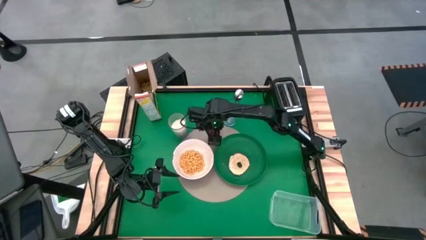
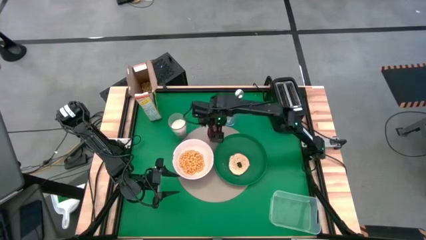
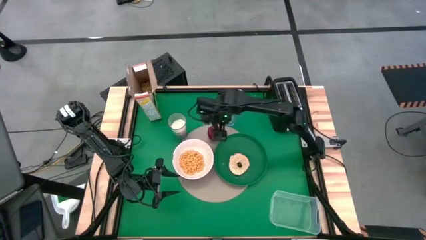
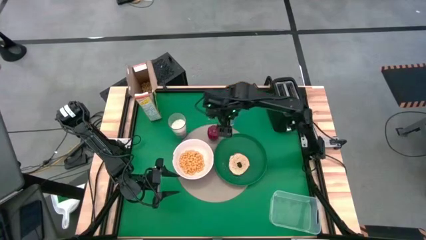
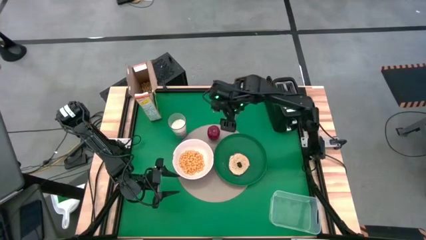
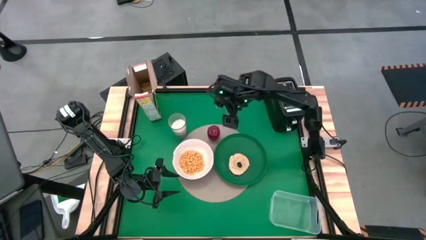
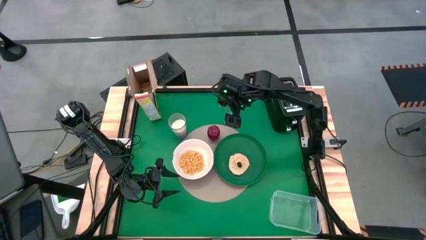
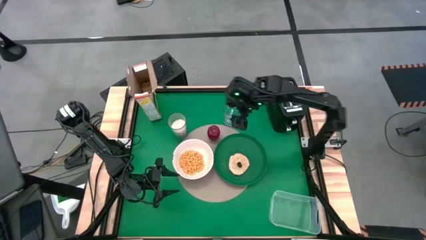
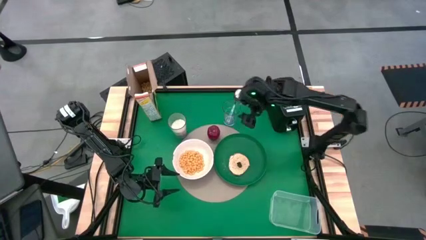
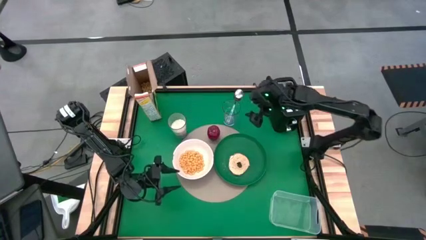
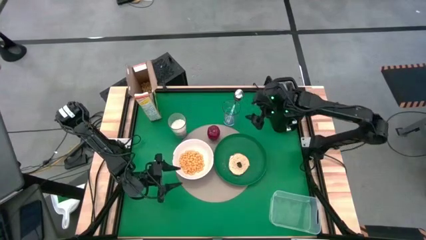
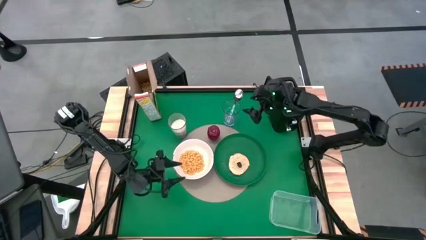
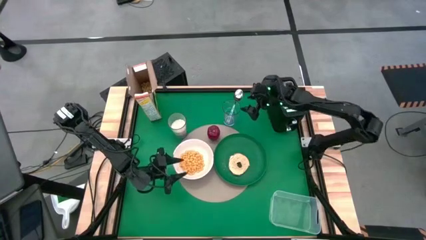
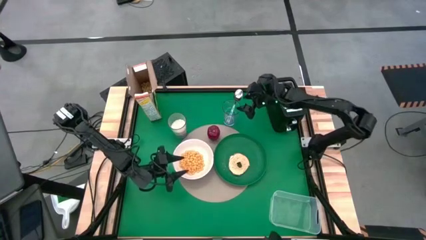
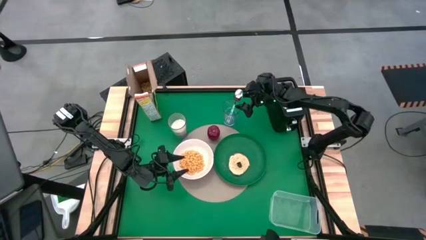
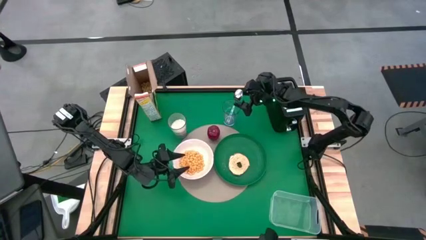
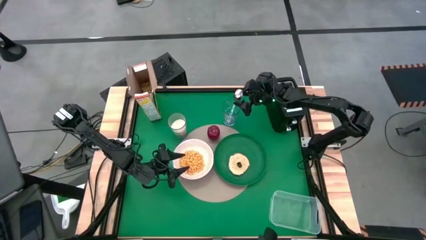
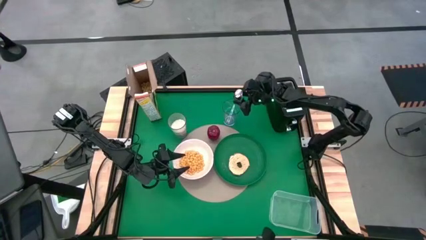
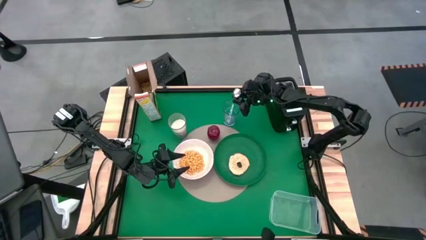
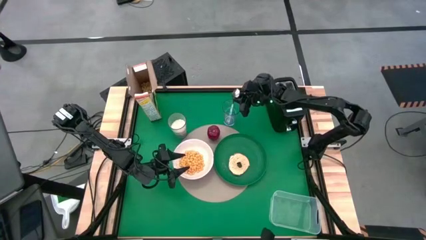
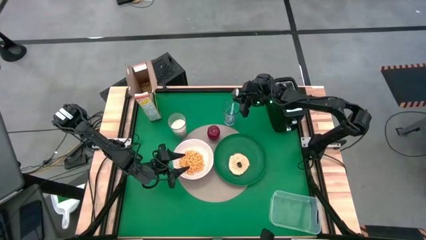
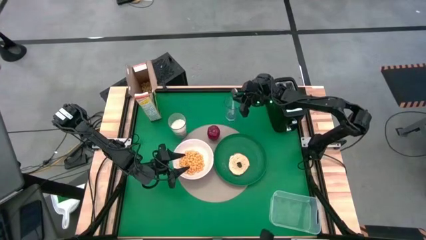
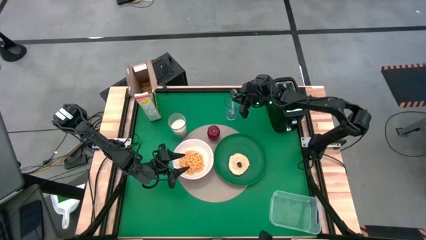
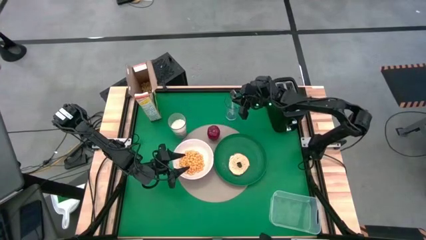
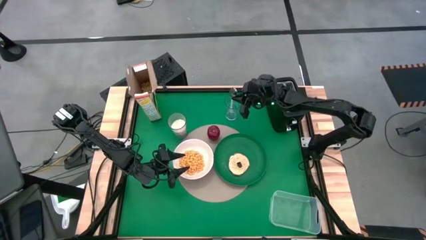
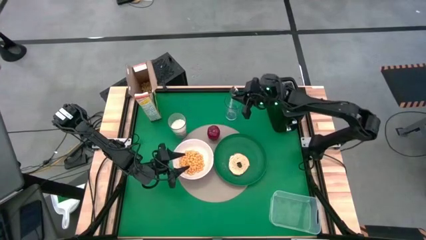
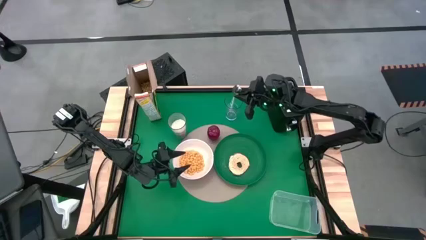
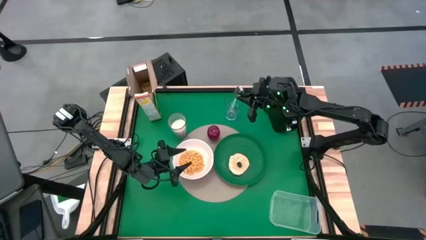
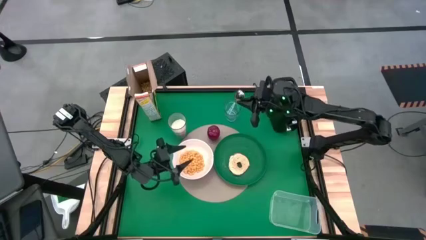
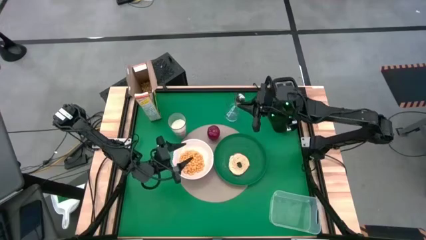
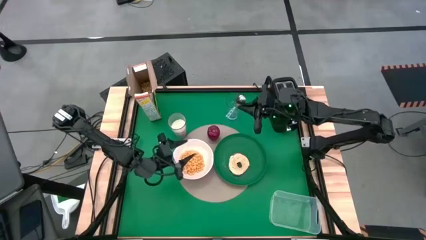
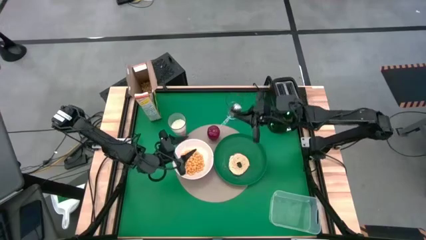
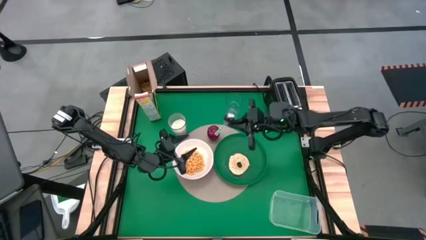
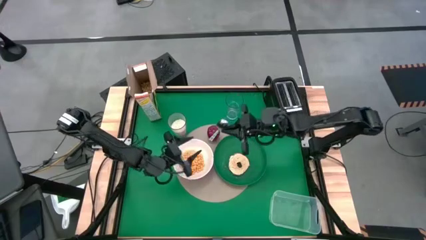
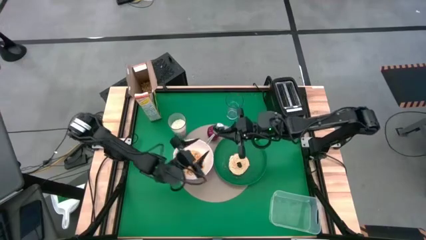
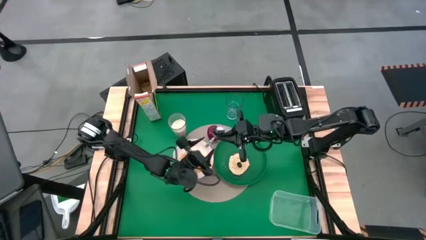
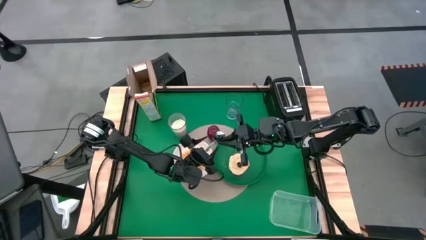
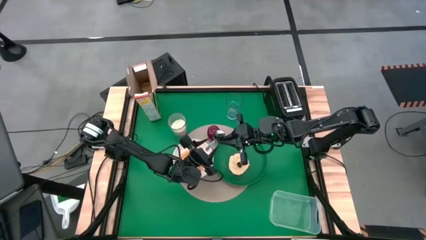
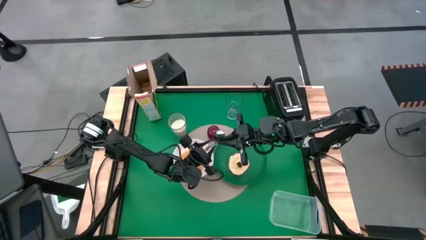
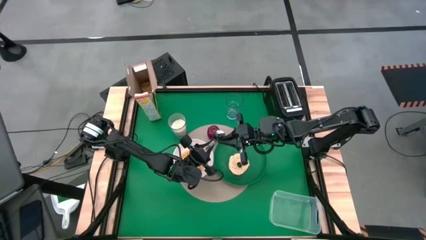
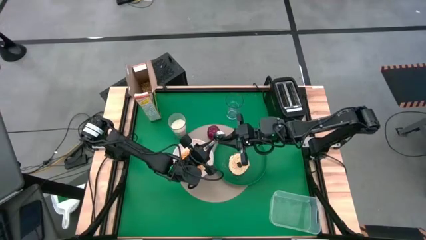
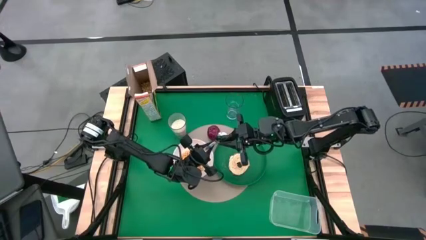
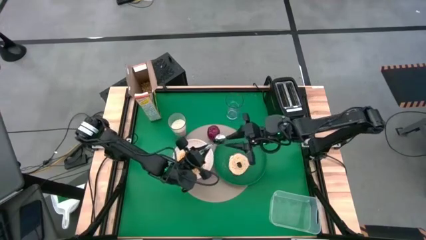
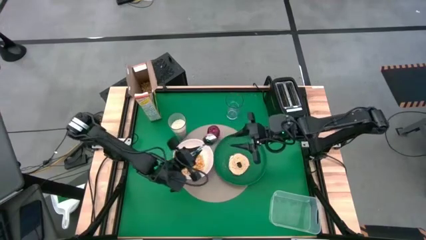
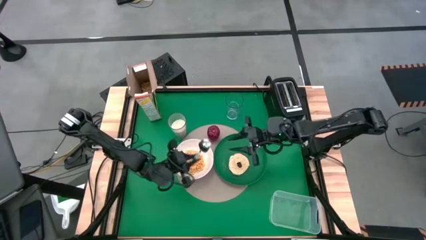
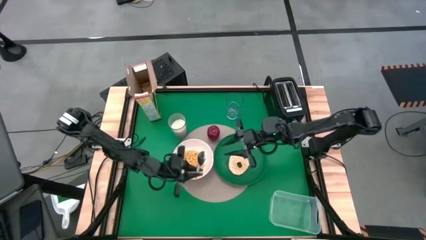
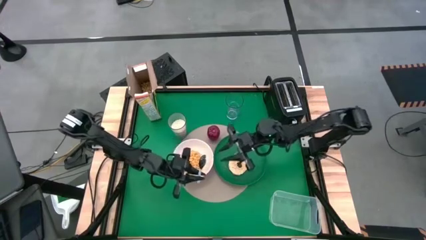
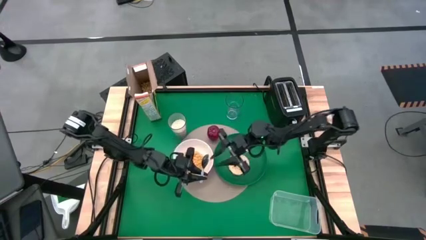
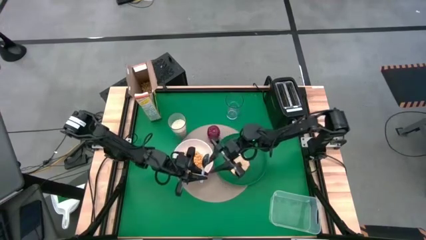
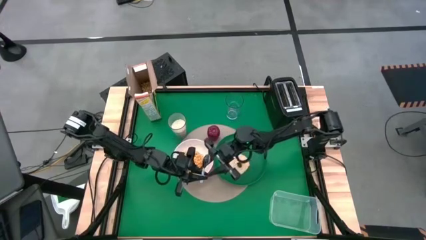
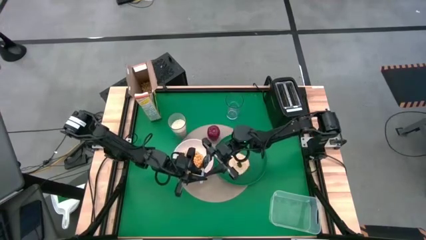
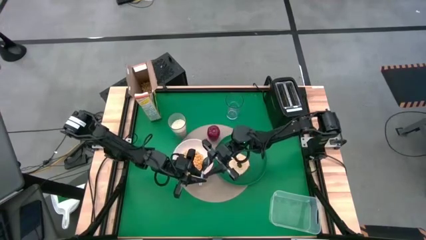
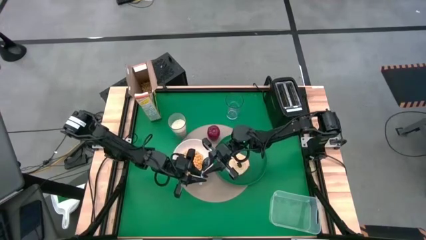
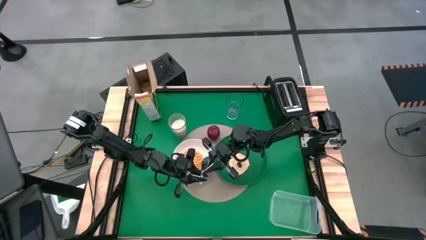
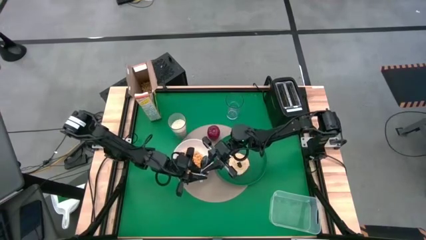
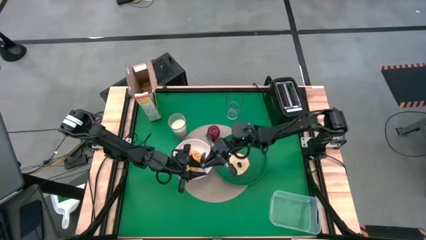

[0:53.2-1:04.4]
Task: Arrange a breakfast setting
Put the spoon to the left side of the white bowl

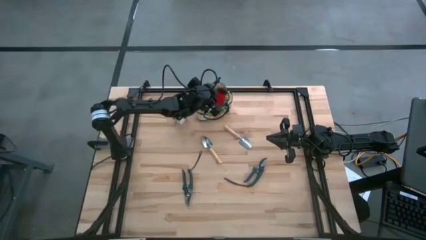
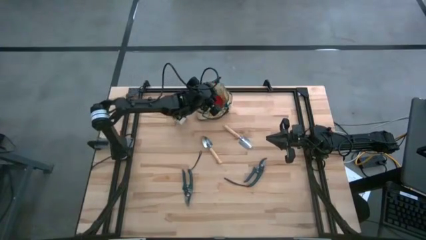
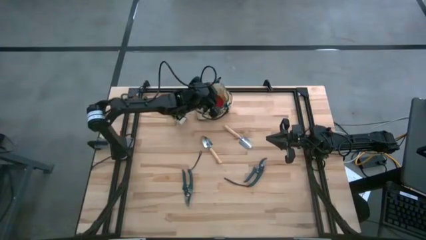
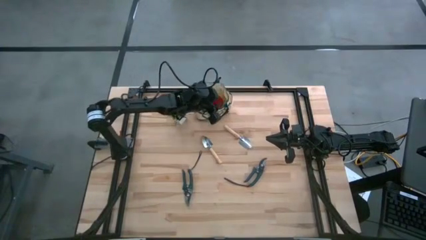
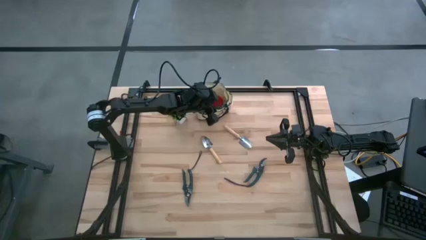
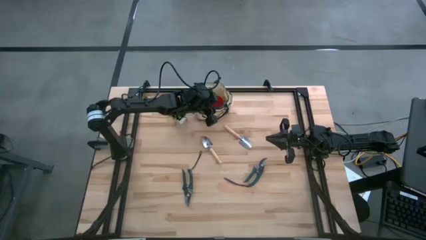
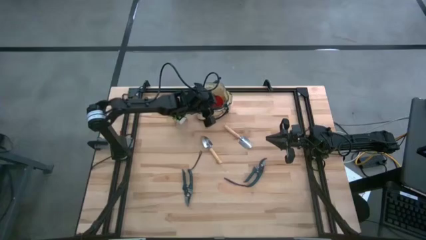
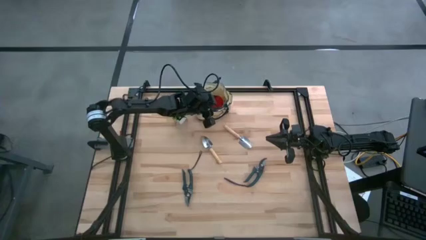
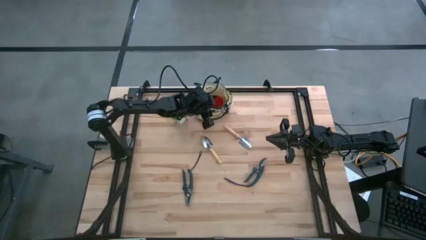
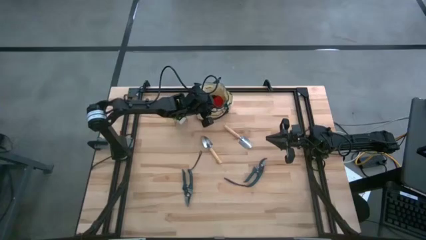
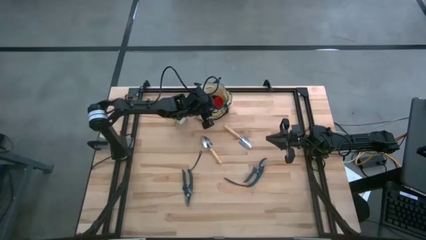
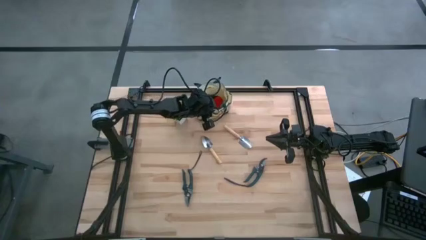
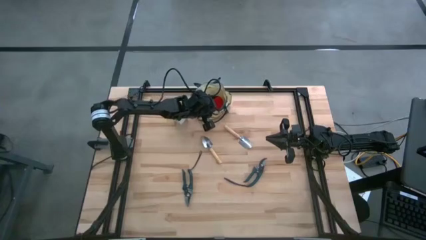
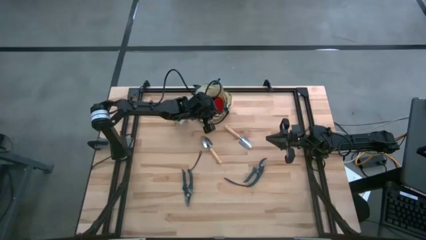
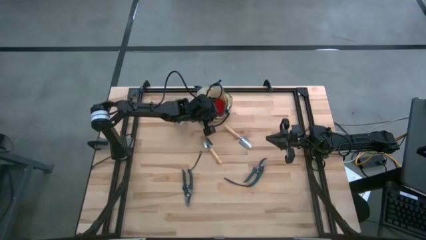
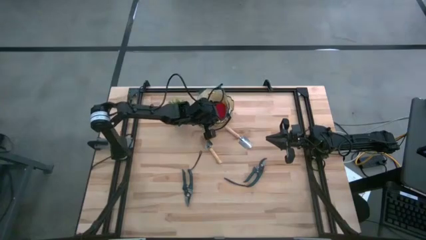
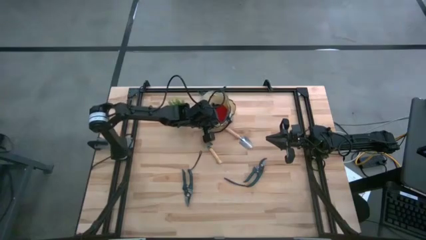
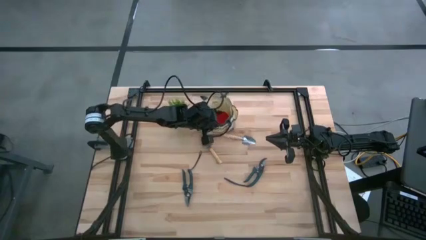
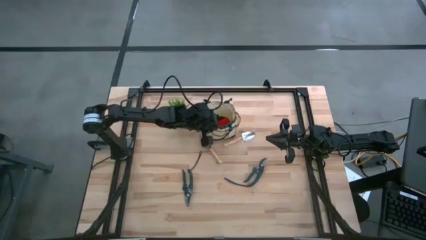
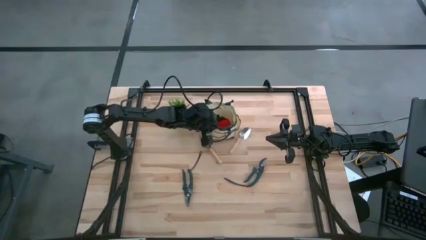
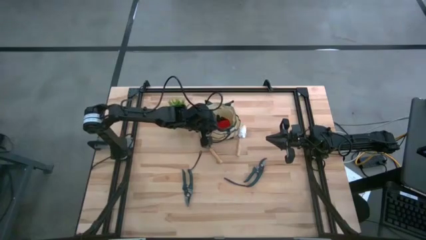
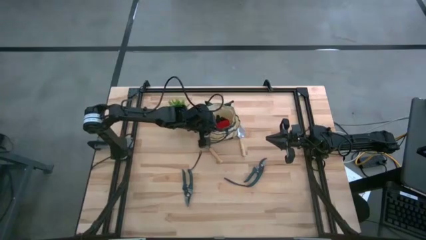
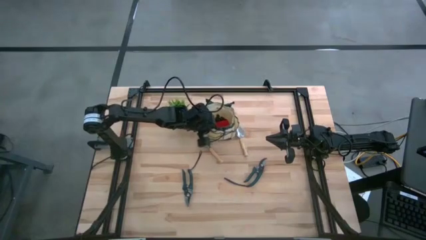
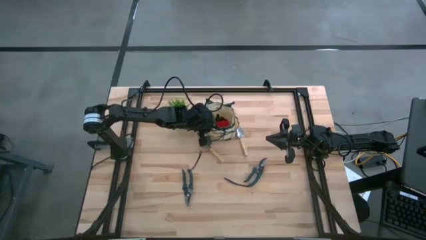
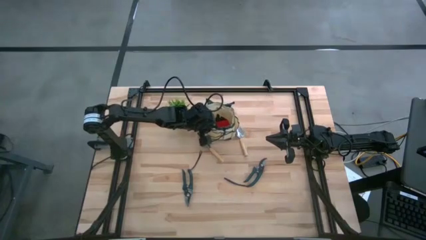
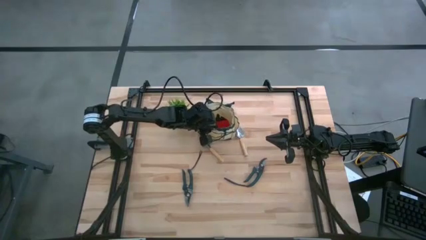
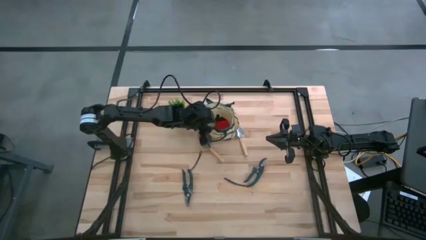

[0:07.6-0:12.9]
Task: Pick & Place Garden tools in Gardening bag
Adjust the white gardening bag
